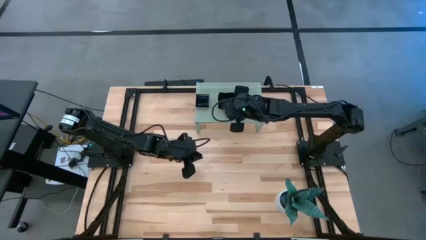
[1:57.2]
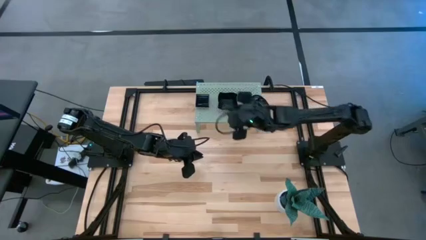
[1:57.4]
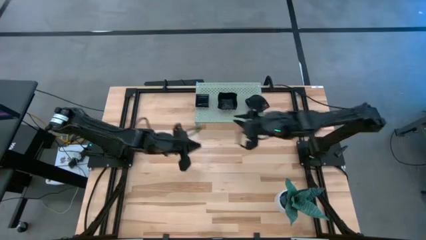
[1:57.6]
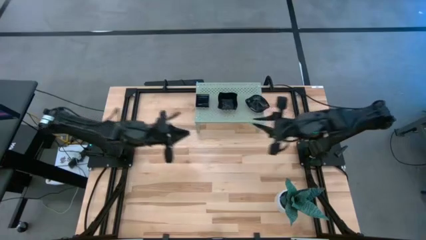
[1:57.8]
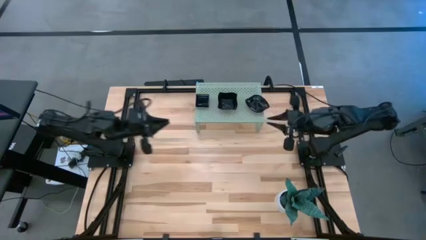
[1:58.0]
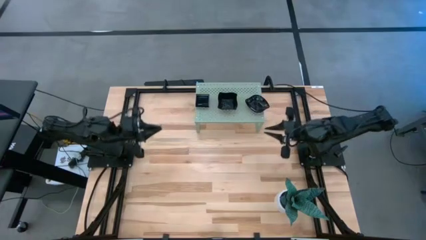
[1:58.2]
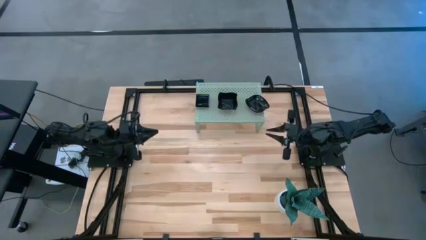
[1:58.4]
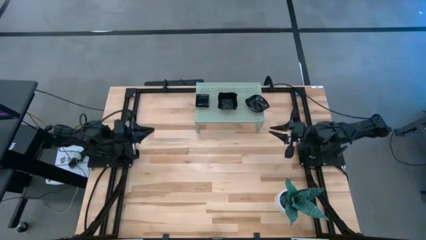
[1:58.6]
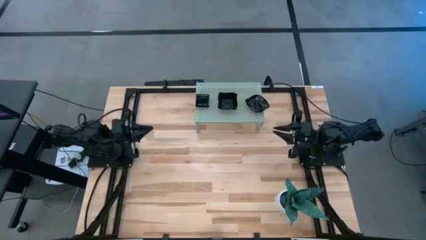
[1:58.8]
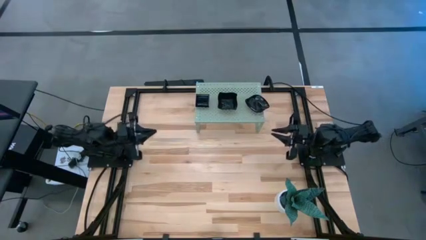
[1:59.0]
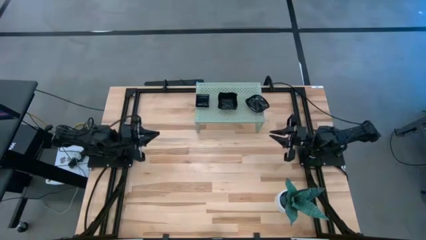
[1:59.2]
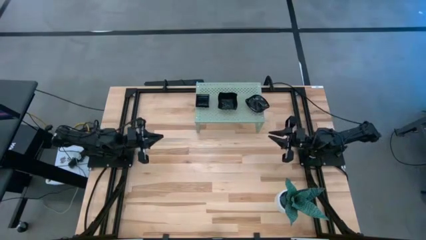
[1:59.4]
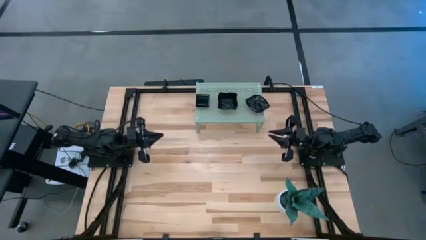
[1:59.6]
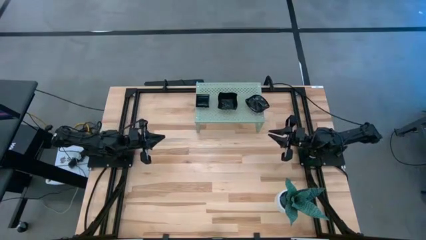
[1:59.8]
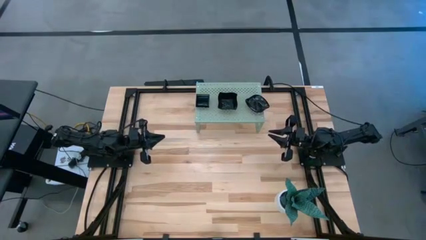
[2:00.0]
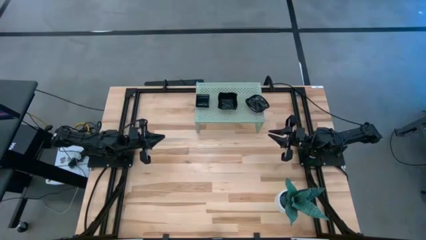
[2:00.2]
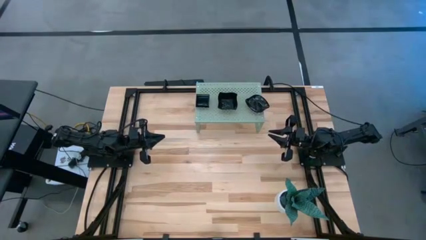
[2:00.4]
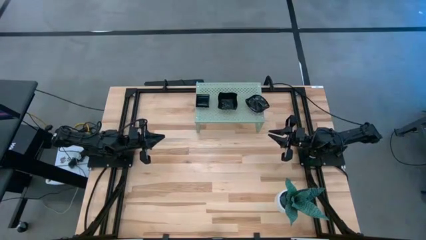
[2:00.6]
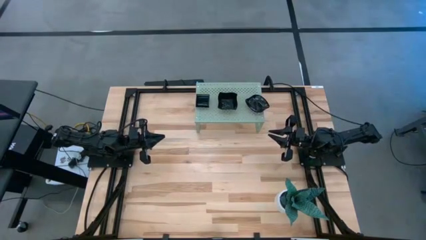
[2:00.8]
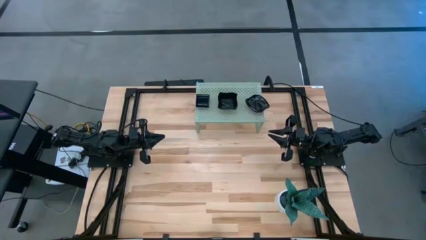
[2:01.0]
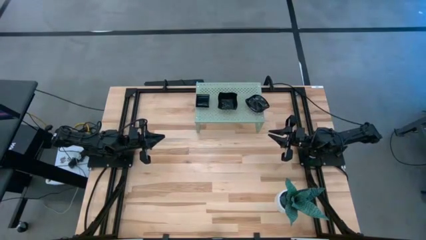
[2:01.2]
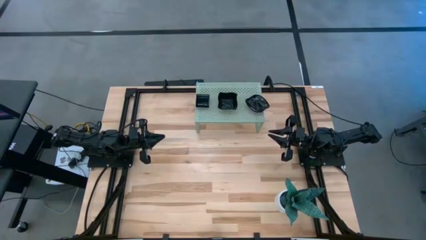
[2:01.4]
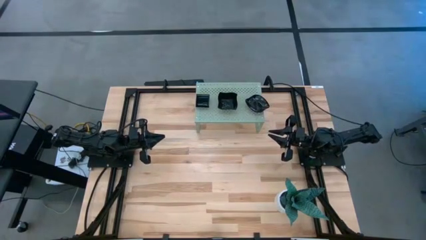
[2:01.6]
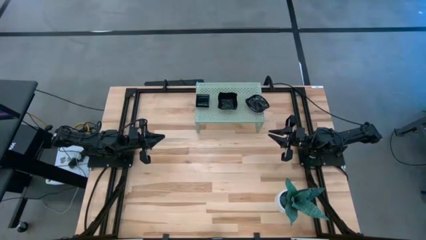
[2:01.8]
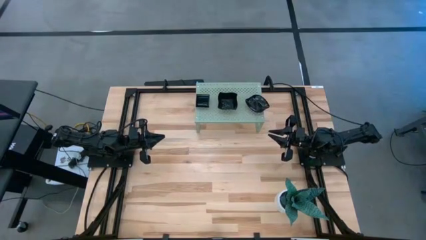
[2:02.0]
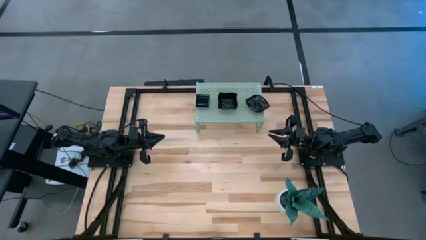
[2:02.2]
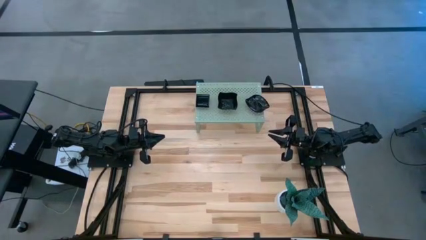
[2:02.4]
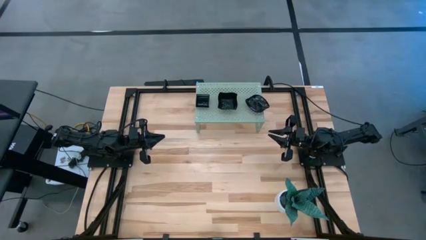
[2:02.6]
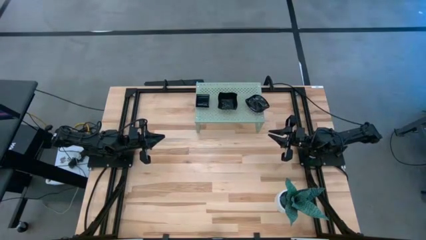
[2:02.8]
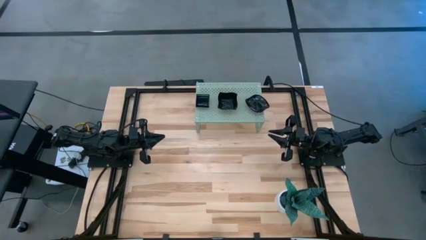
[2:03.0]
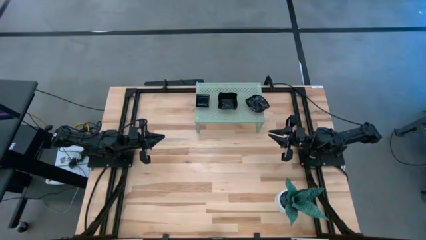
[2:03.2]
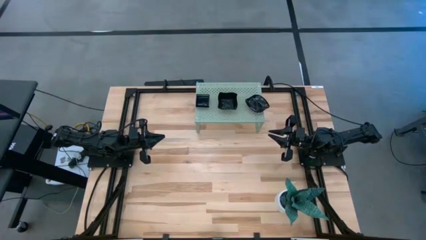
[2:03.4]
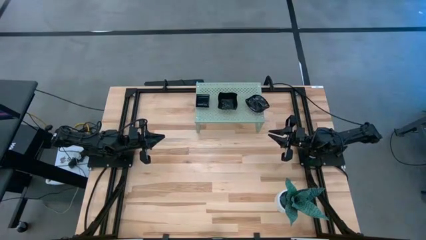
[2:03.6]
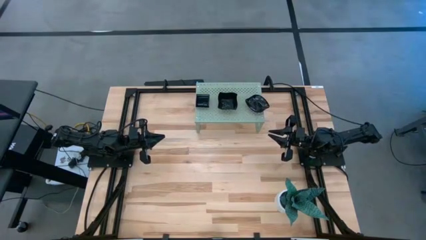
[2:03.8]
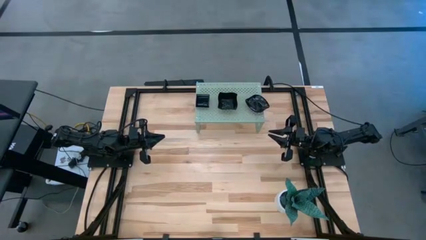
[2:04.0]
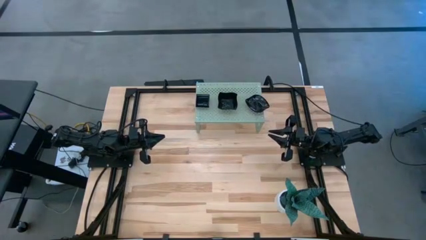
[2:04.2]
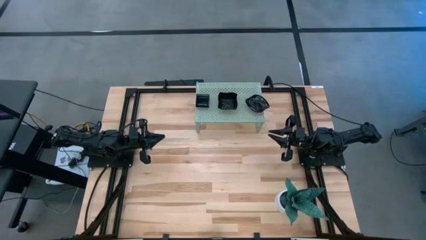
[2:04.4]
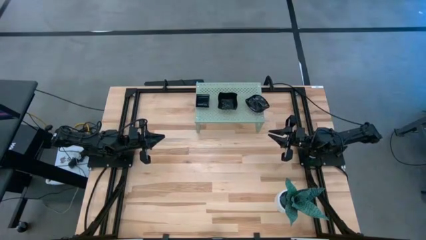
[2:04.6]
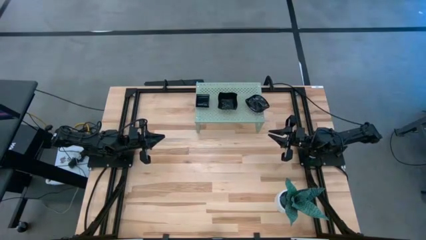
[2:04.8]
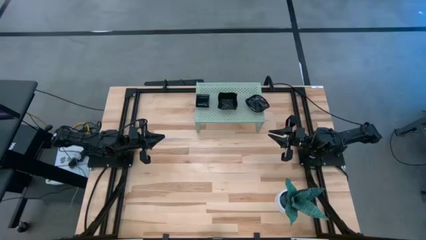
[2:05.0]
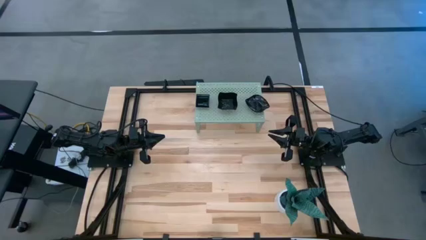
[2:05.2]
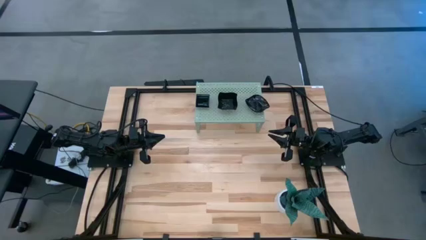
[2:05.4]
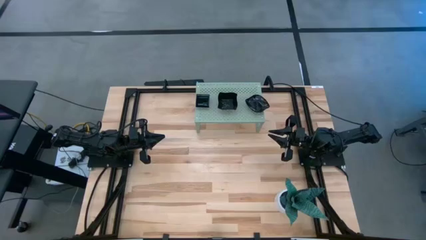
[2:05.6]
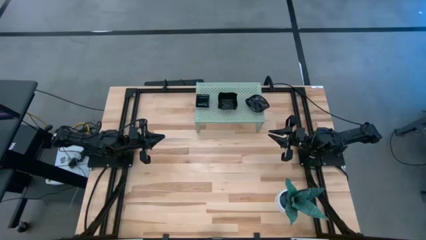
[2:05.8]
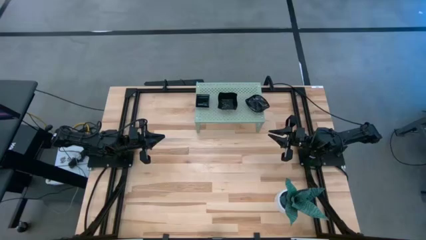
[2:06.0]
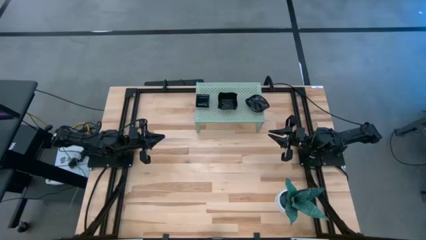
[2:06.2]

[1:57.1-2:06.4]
Task: Pick & Place Mini shaped plates
Return to Home Position

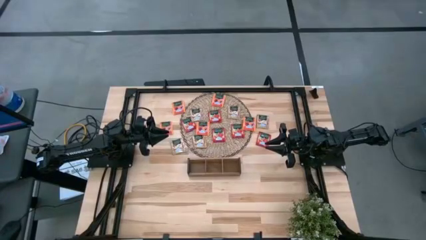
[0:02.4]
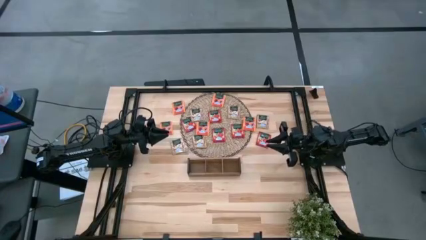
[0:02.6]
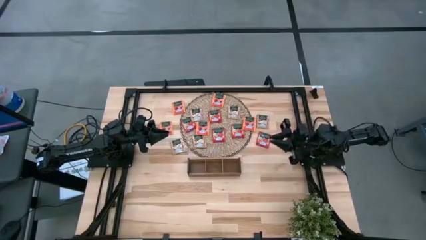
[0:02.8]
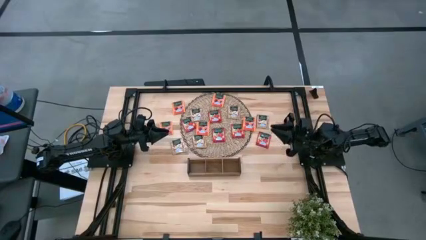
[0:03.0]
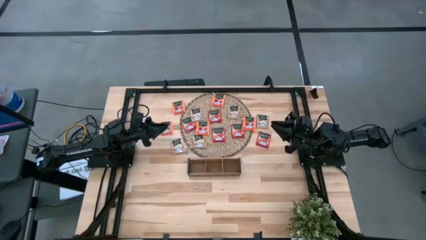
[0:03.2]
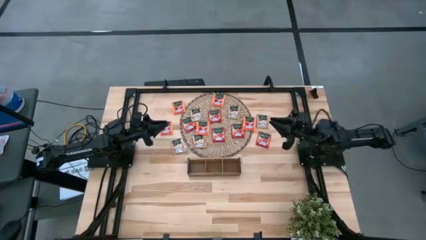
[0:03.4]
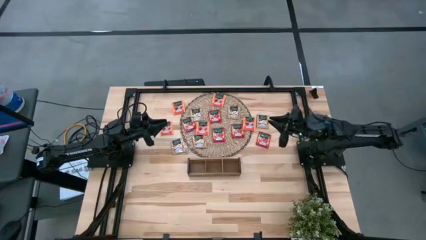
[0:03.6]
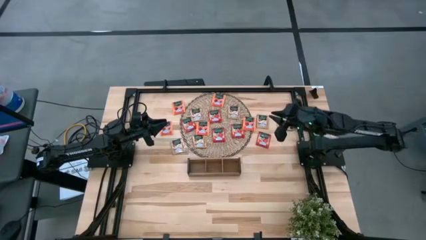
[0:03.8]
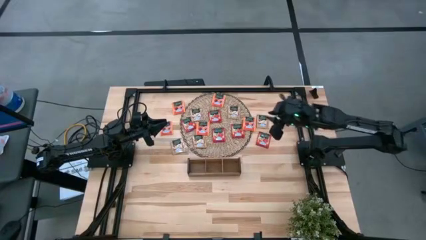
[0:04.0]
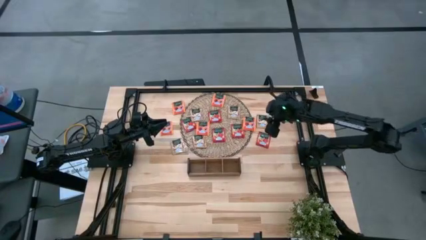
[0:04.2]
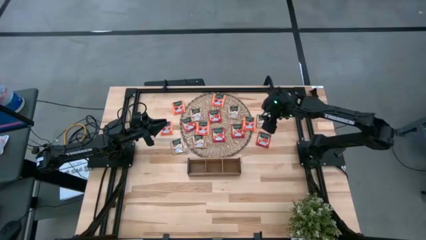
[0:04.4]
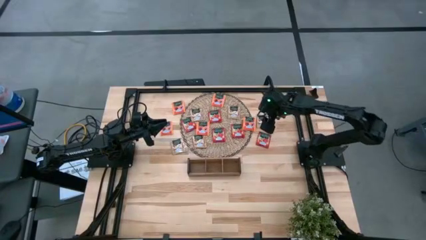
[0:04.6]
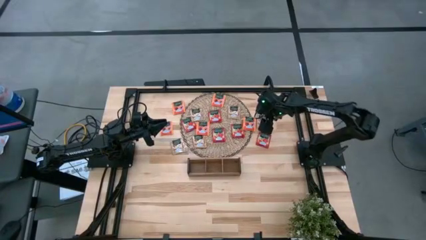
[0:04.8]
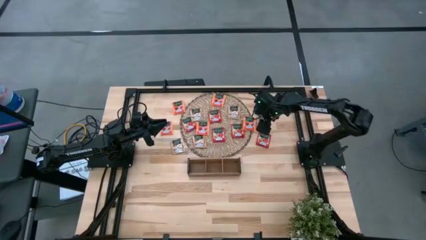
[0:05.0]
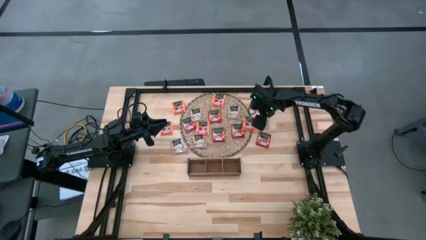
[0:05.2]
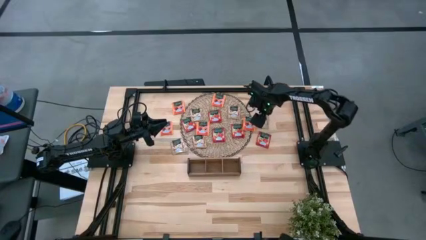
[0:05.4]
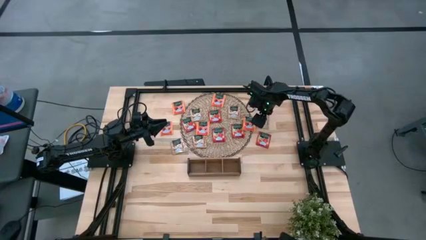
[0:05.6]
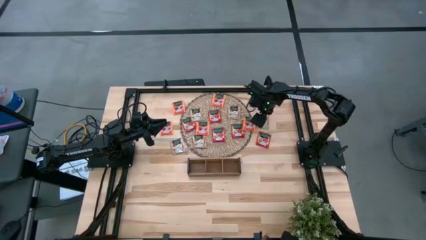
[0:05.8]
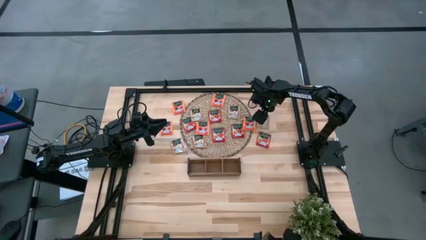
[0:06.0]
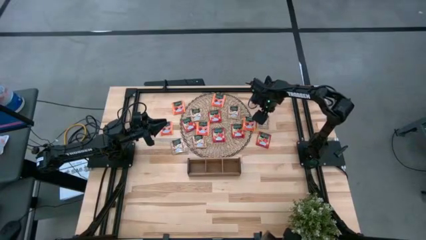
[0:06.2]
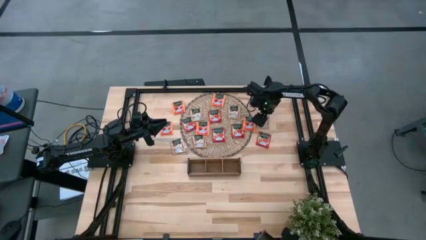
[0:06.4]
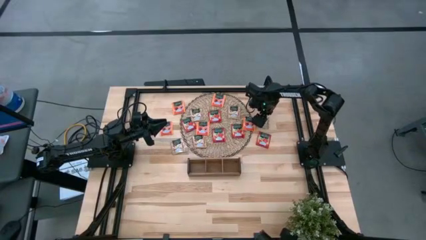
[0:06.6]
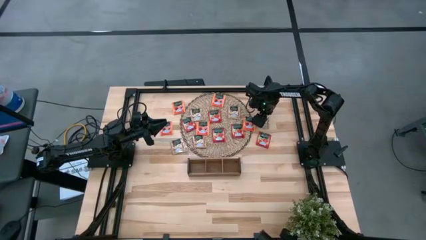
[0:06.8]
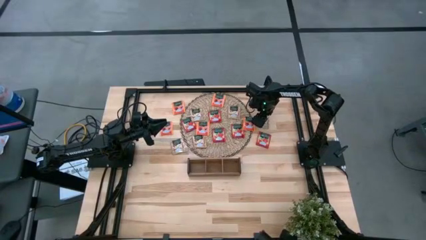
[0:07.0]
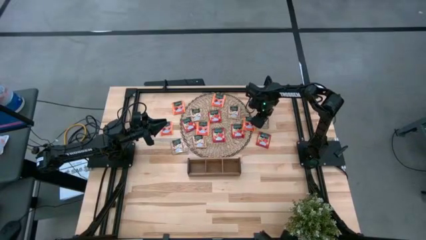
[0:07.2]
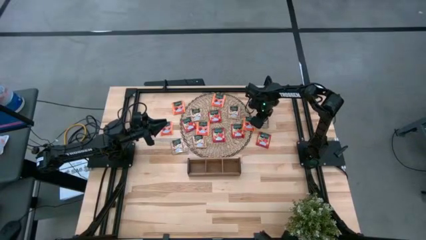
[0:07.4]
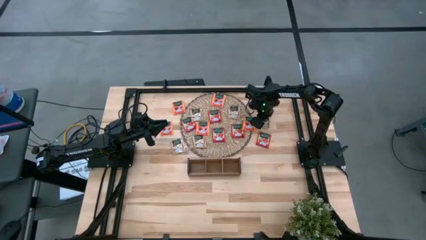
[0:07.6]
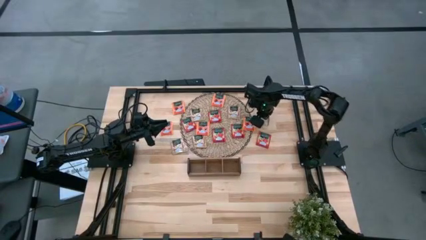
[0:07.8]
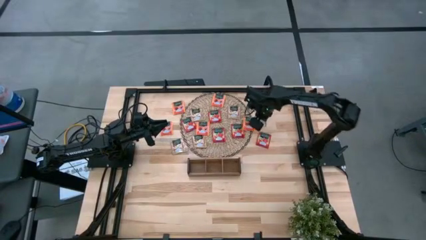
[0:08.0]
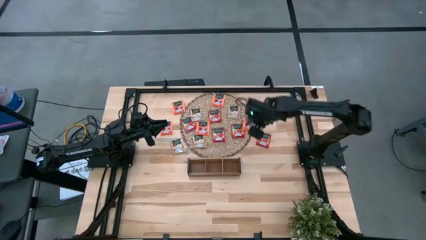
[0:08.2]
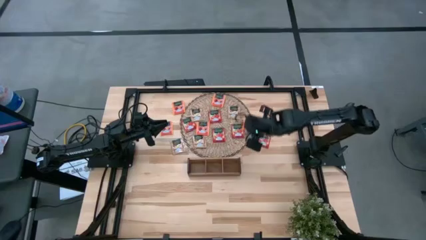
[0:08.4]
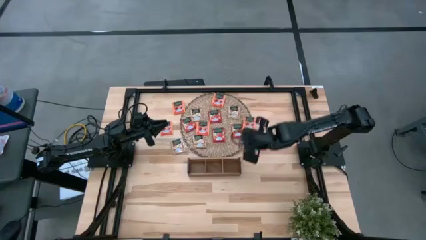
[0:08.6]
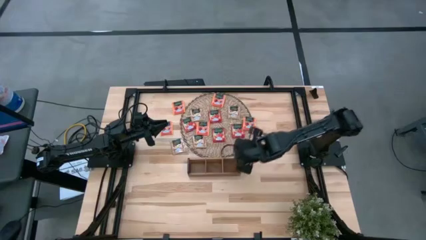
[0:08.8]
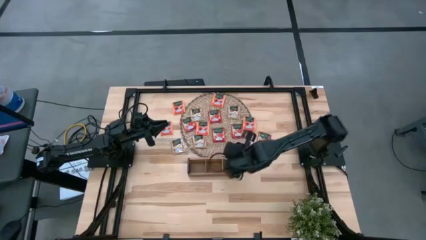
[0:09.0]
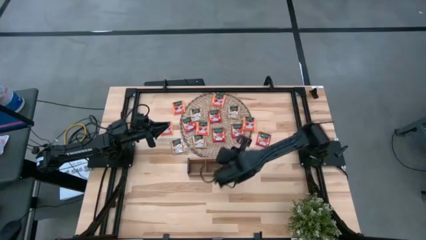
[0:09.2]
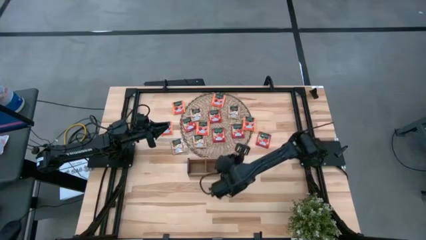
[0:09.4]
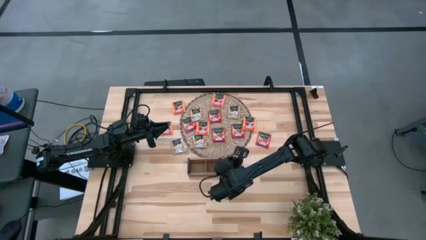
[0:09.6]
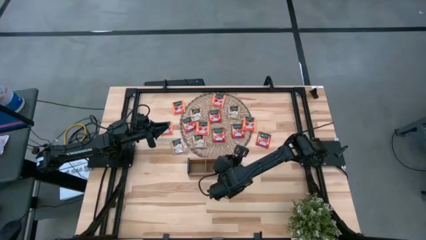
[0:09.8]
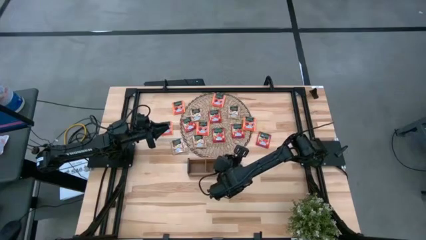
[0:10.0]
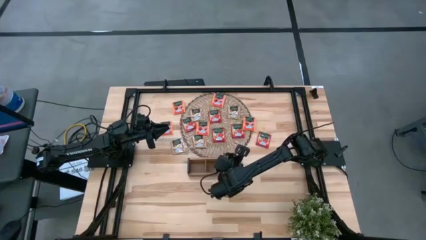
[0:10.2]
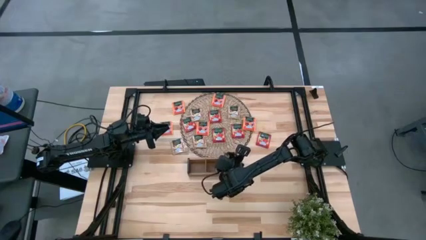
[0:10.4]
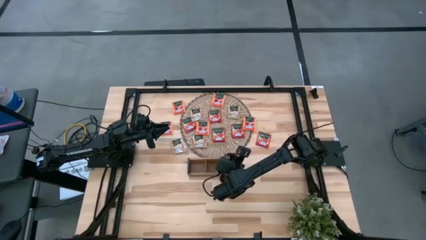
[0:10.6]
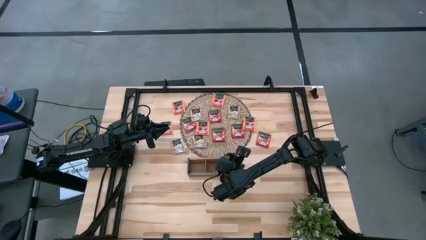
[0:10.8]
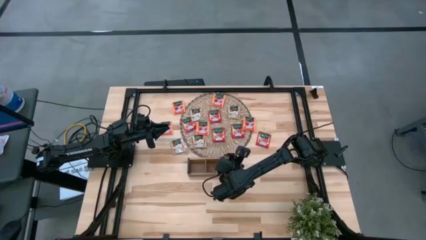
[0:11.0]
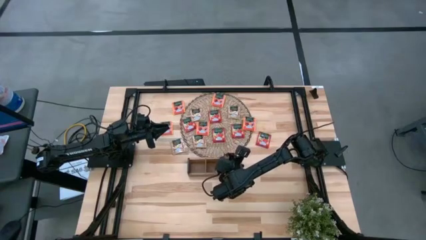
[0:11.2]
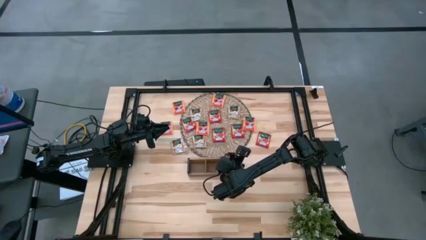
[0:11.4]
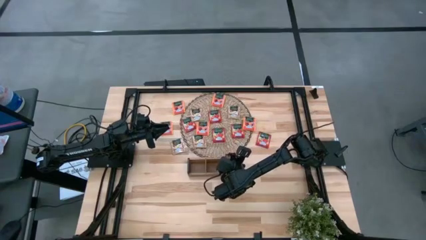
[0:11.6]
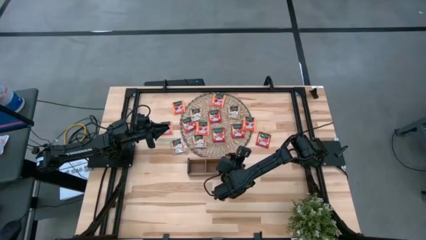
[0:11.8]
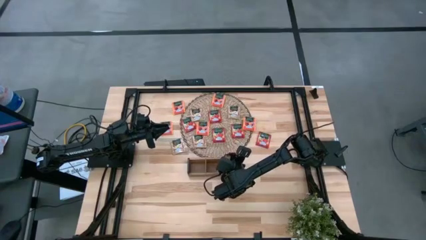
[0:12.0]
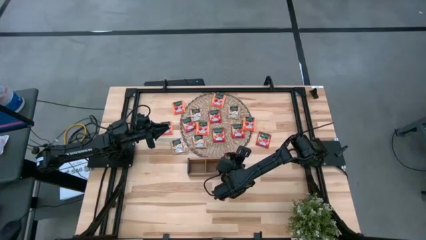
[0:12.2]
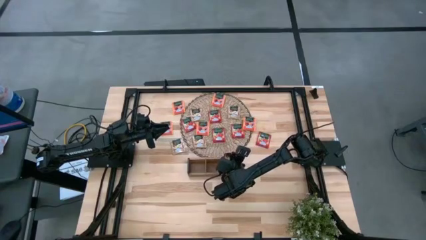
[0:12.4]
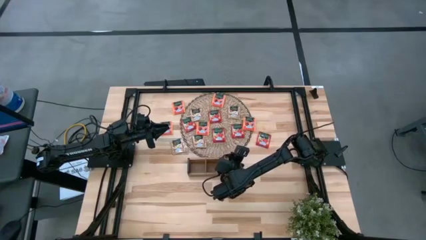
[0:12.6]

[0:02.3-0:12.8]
Task: Pick & Place Tea
Put the gold tea bag into the right section of the wooden organizer
